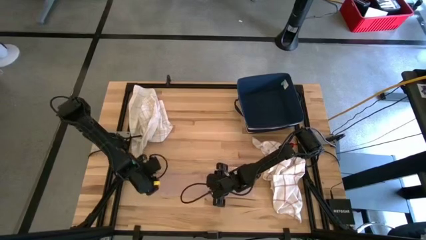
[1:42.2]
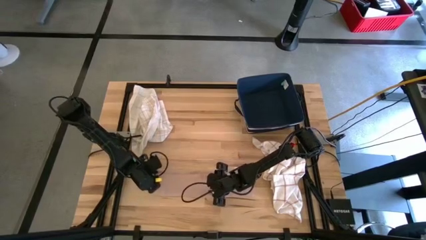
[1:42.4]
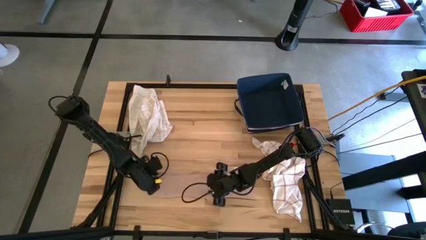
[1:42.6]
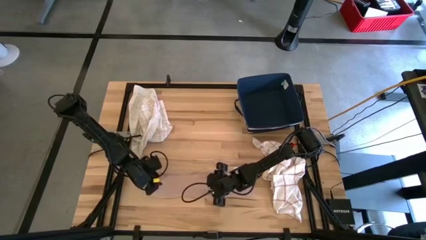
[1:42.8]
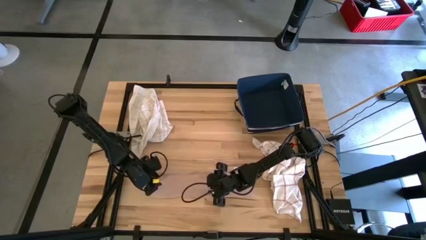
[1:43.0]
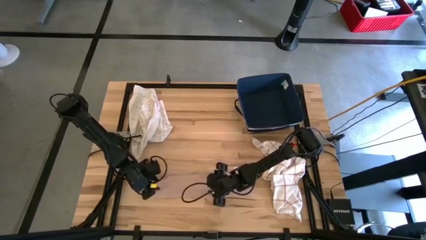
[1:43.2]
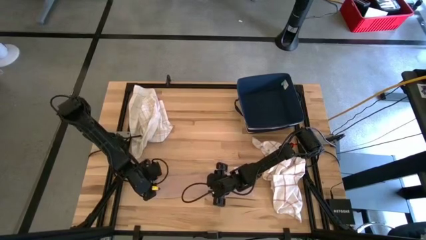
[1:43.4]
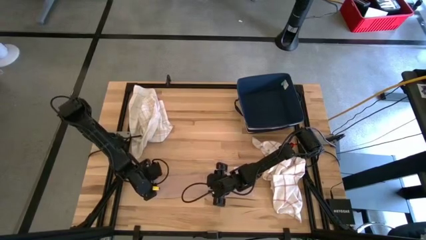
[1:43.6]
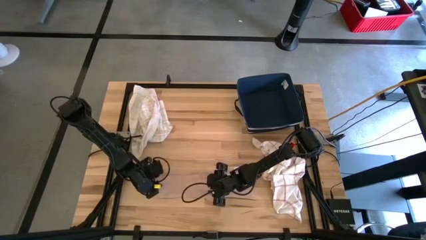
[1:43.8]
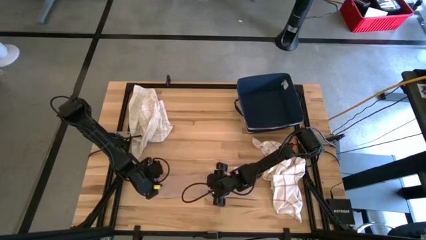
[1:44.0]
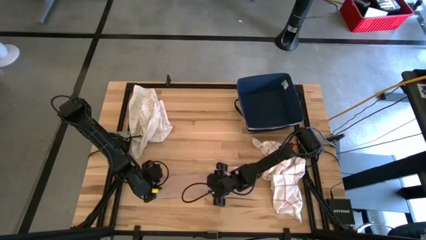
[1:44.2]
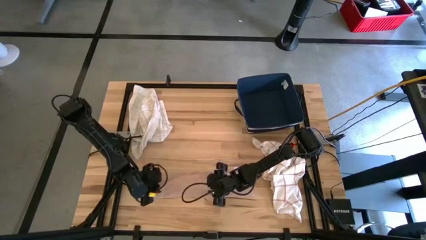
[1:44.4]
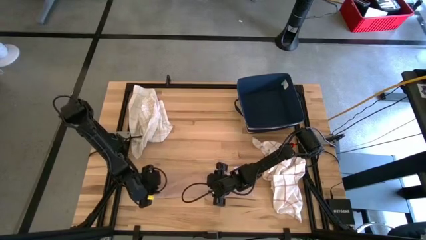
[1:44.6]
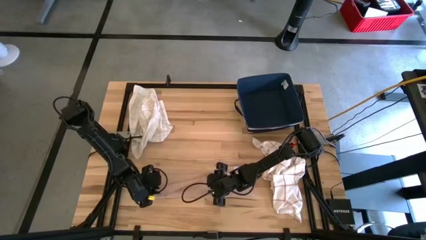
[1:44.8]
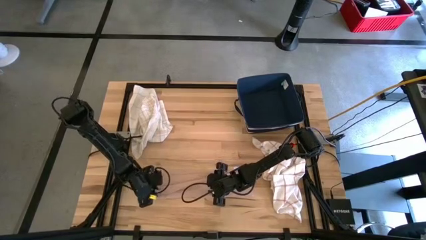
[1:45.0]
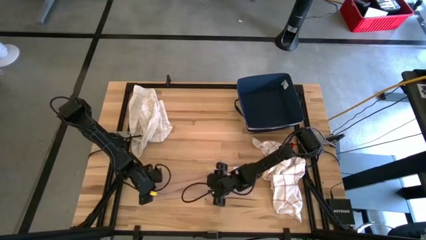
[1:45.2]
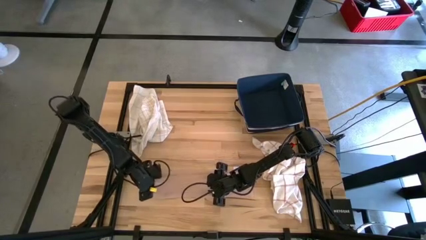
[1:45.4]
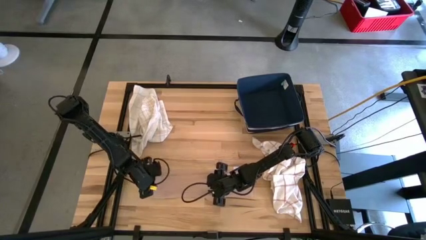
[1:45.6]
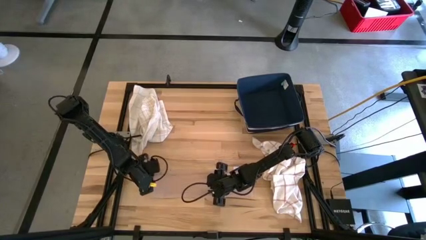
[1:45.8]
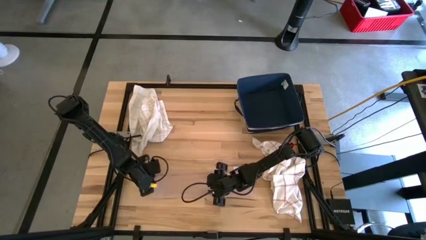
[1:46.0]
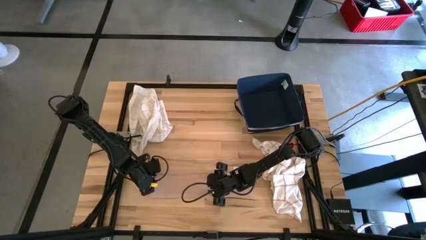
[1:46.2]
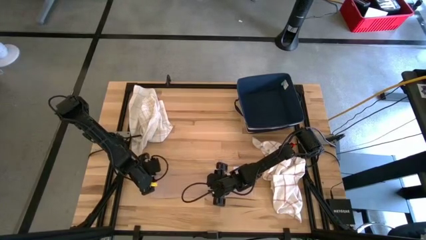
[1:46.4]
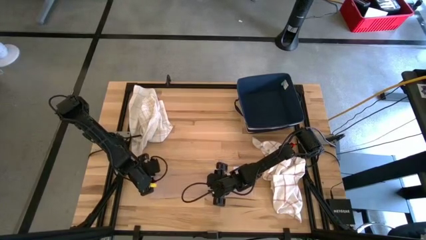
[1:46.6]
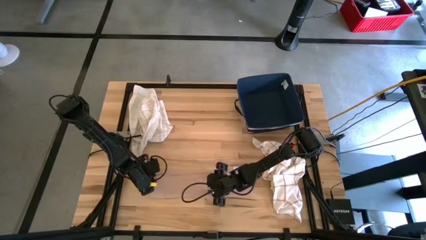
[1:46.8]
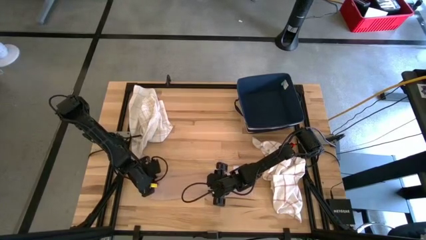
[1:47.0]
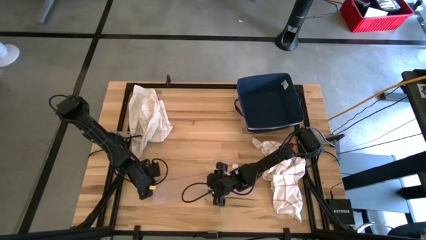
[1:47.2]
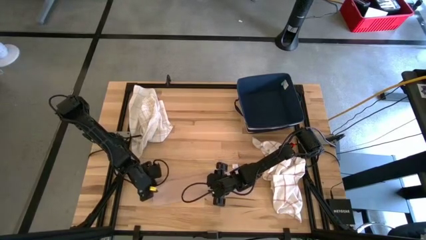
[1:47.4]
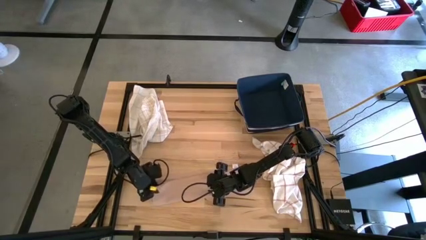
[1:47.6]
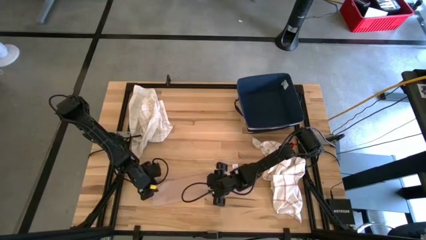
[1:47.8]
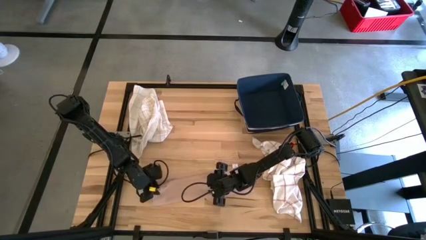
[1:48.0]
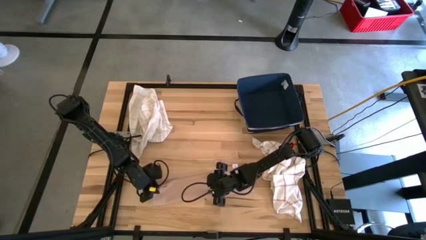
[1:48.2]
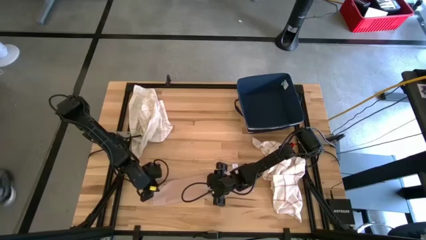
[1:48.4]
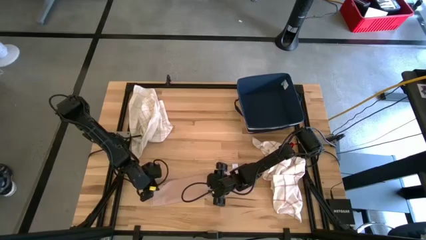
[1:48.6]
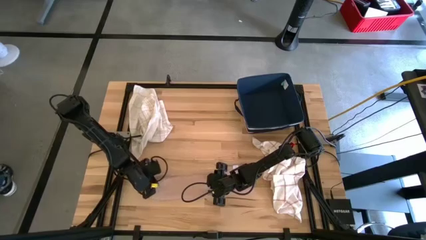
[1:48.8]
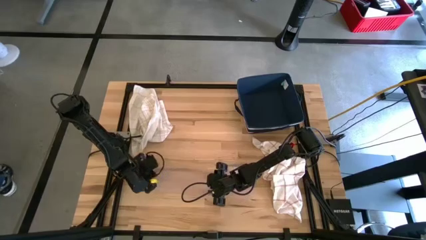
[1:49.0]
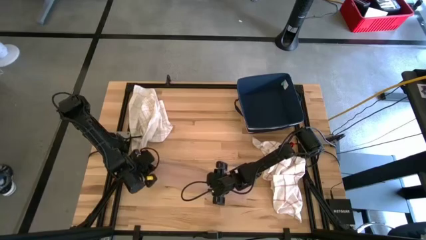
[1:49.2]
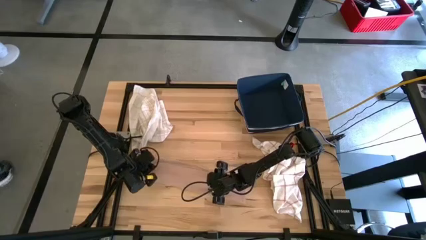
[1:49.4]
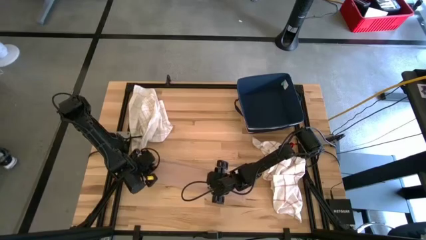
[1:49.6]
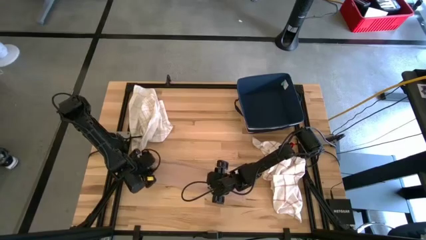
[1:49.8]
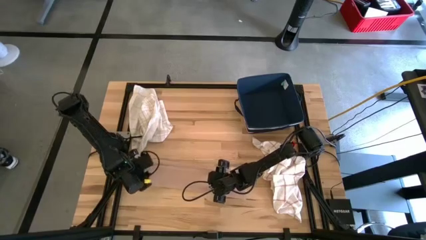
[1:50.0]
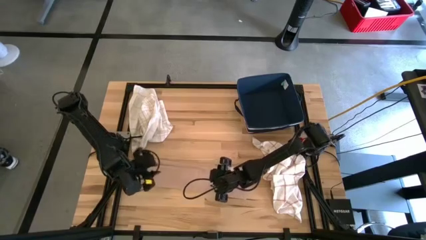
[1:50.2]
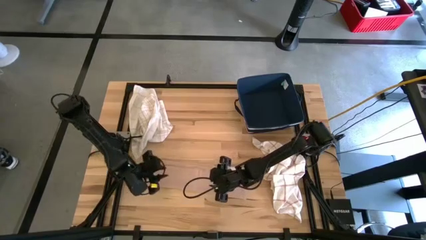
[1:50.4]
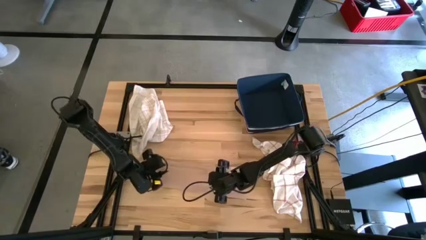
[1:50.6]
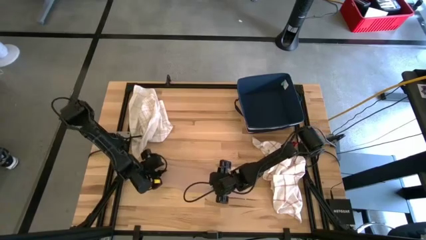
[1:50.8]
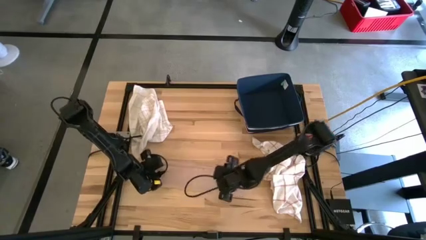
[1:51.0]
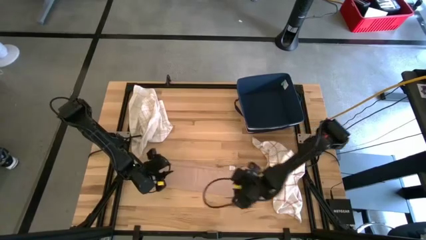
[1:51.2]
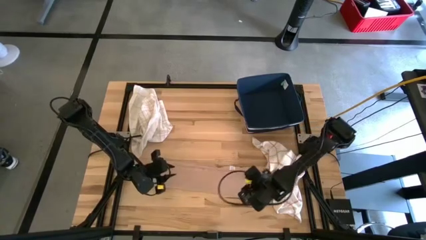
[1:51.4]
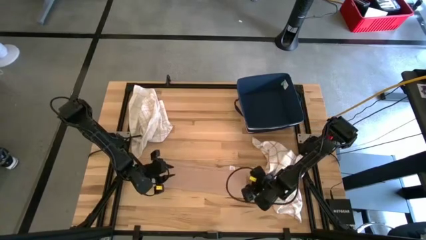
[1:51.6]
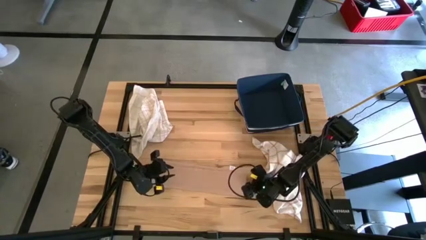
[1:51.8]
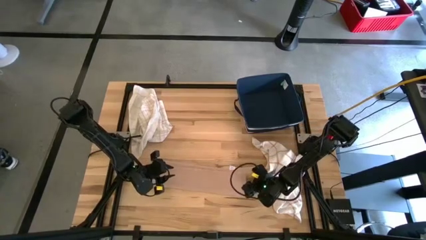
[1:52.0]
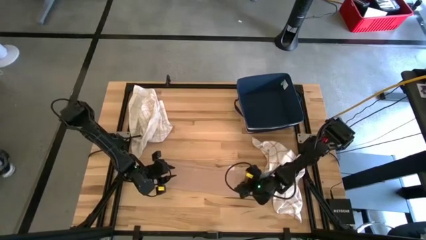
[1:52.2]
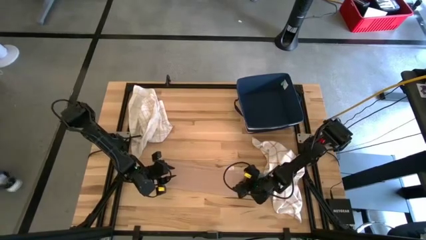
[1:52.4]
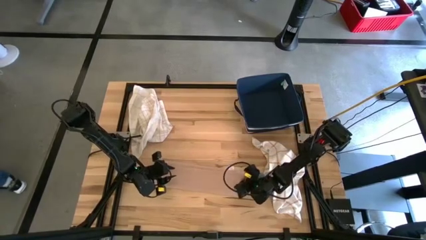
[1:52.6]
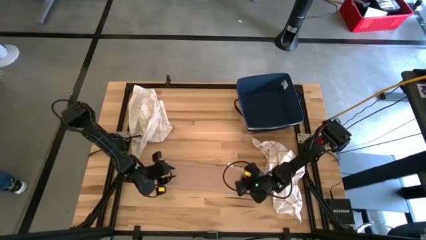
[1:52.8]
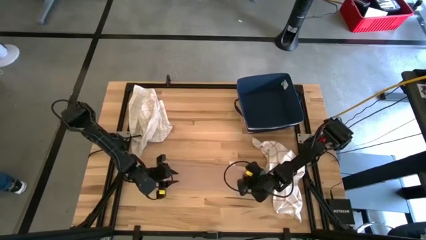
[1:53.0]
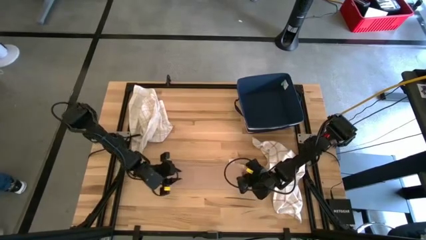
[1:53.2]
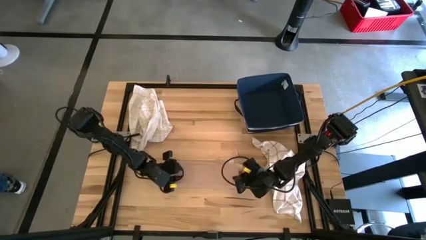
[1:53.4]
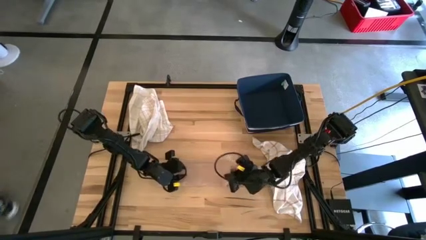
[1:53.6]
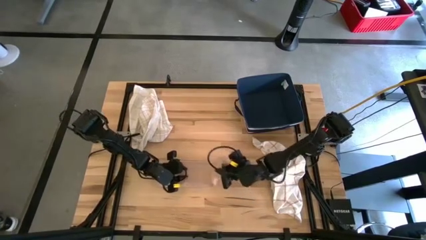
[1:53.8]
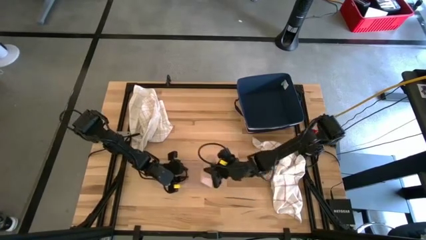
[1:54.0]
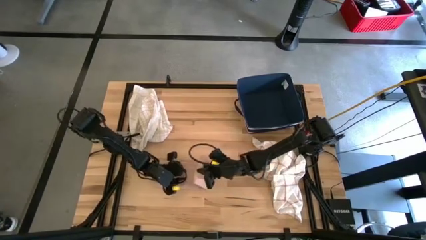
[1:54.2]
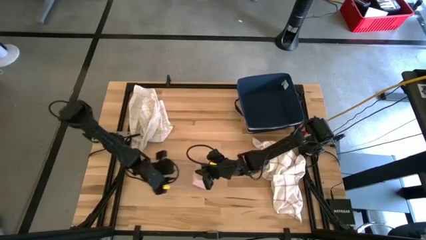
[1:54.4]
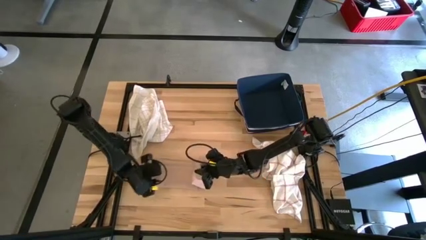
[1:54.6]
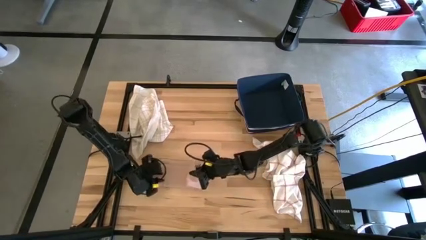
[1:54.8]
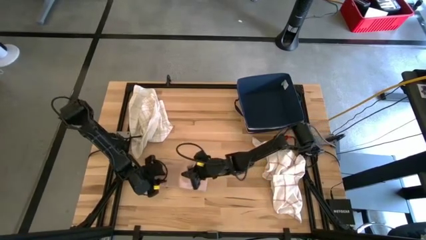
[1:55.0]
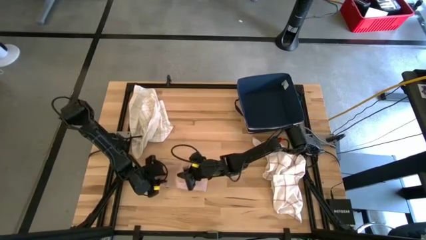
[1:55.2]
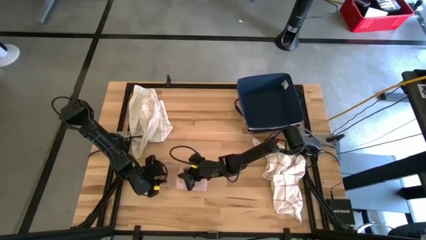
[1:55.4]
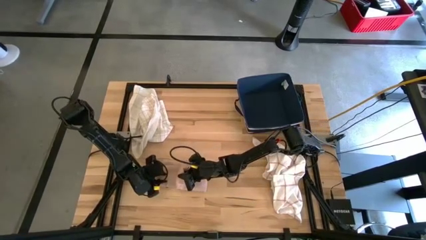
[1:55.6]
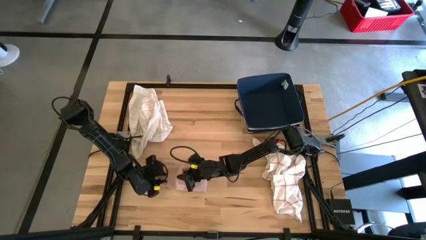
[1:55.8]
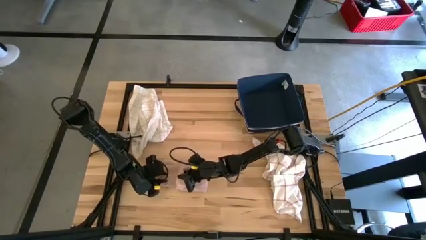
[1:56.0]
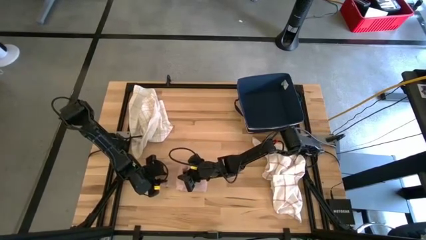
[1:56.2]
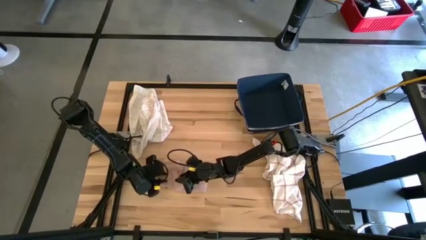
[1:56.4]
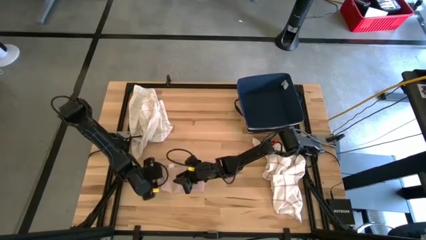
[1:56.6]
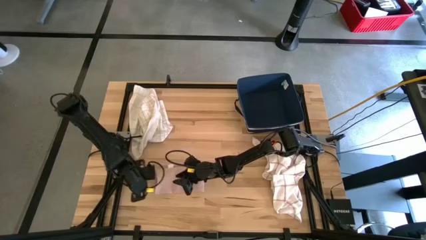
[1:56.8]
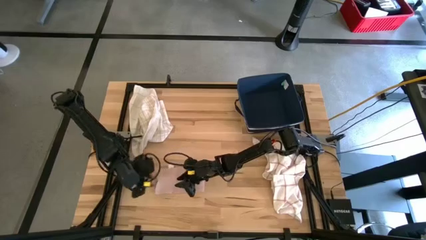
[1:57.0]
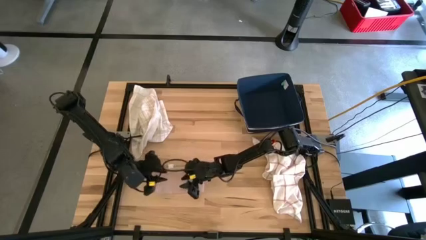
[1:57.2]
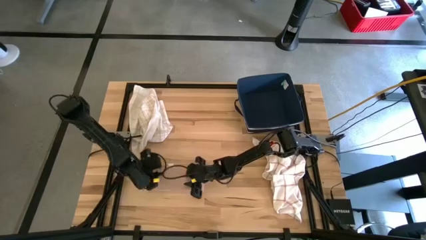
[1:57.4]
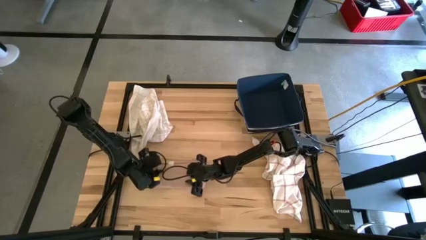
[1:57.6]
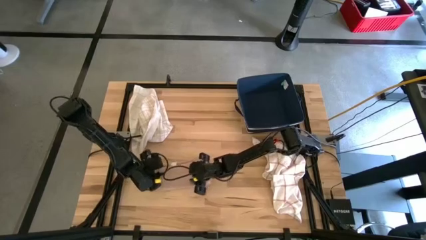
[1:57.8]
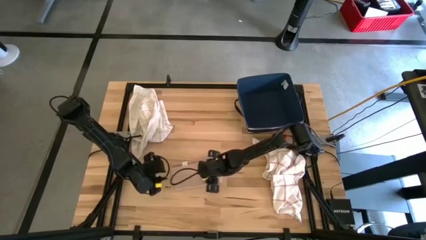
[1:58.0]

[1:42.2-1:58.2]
Task: Fold towel
Fold the pink towel

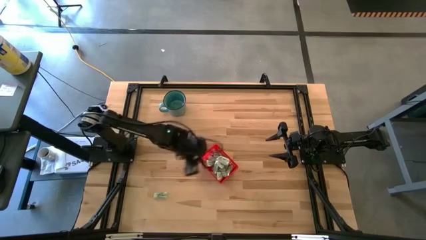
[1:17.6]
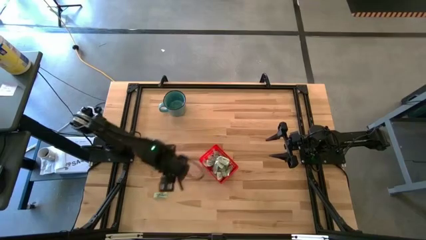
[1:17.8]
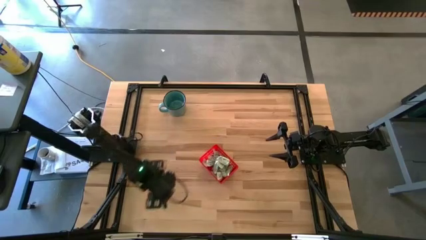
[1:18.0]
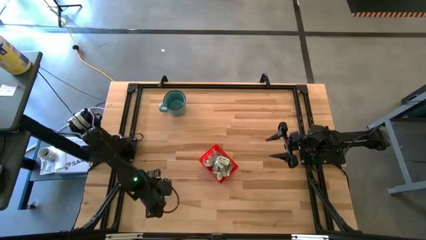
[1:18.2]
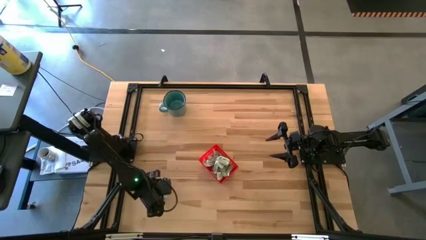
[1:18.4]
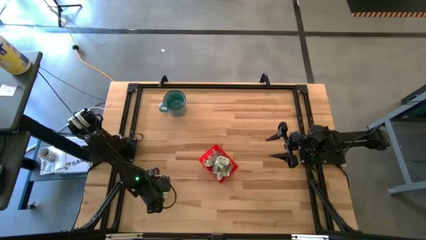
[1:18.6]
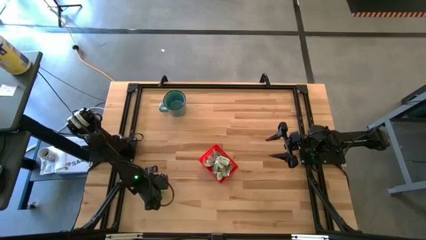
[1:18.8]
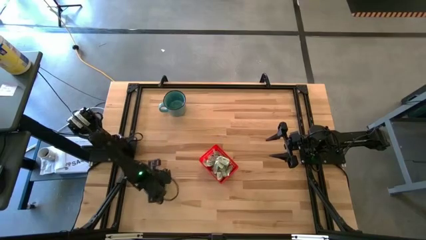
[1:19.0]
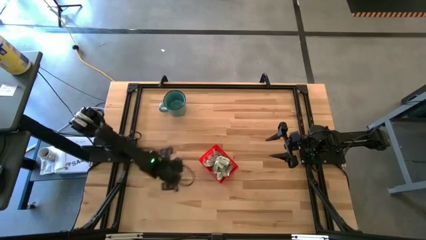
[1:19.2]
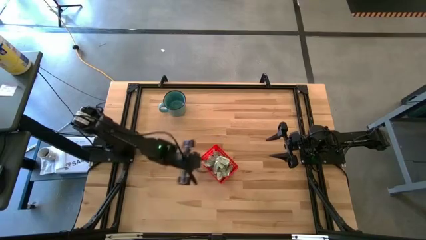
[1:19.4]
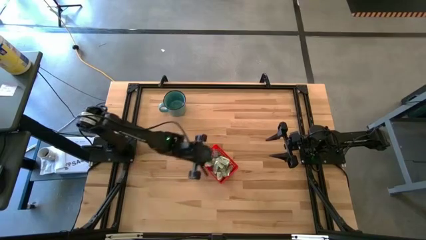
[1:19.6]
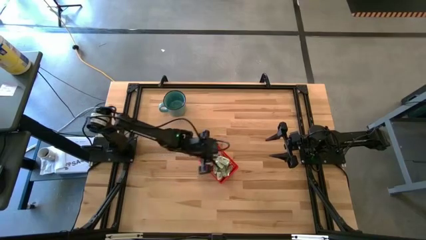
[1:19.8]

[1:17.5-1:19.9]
Task: Pick and place Stevia / Truvia into bins
Put the white stevia packet into the basket
